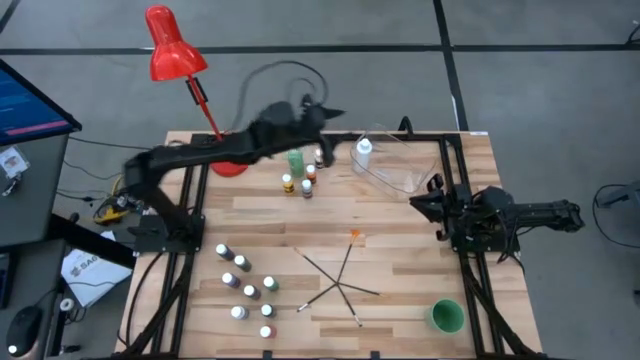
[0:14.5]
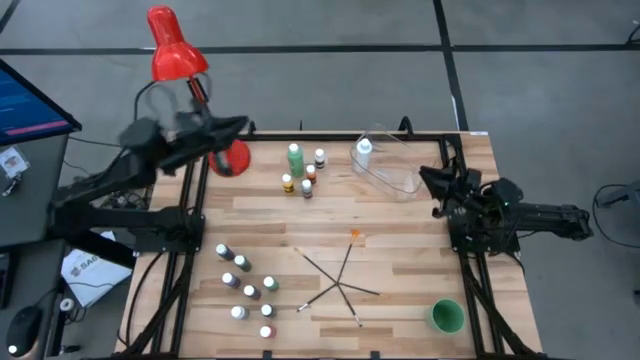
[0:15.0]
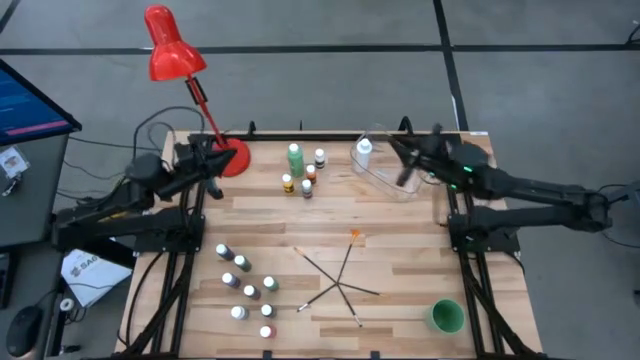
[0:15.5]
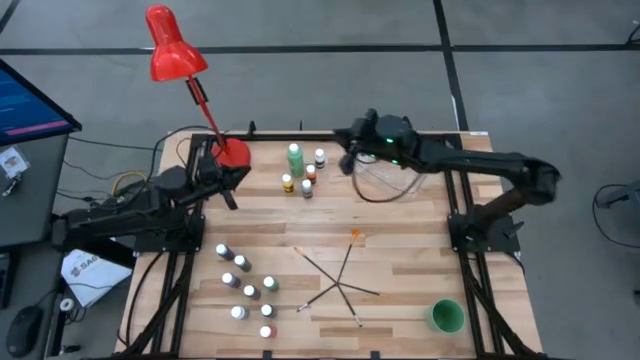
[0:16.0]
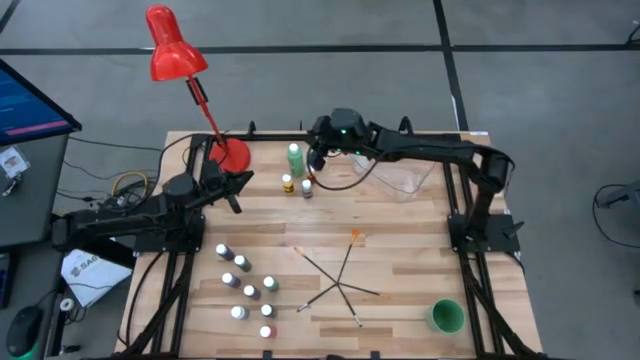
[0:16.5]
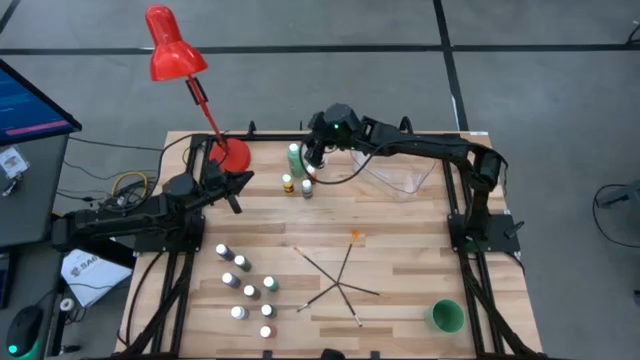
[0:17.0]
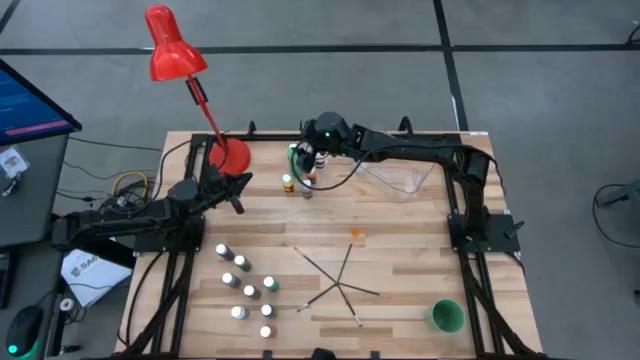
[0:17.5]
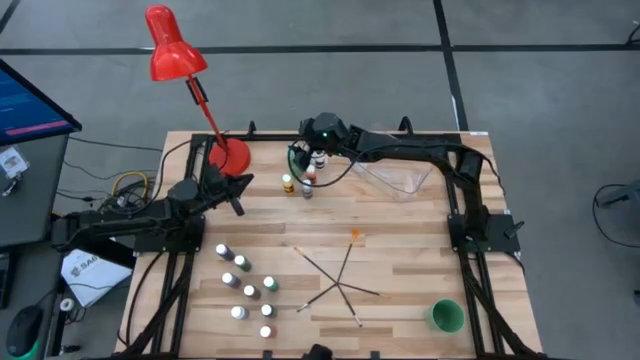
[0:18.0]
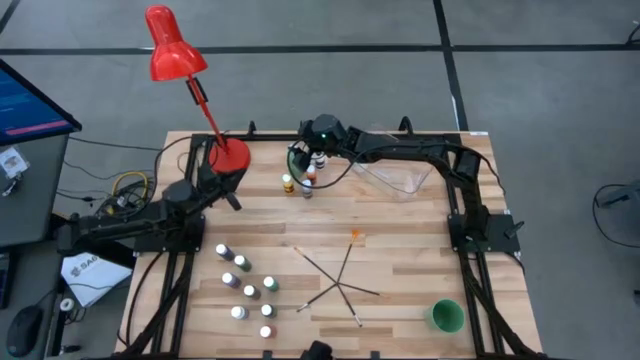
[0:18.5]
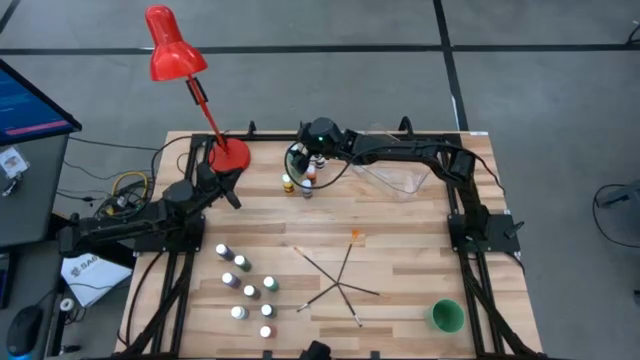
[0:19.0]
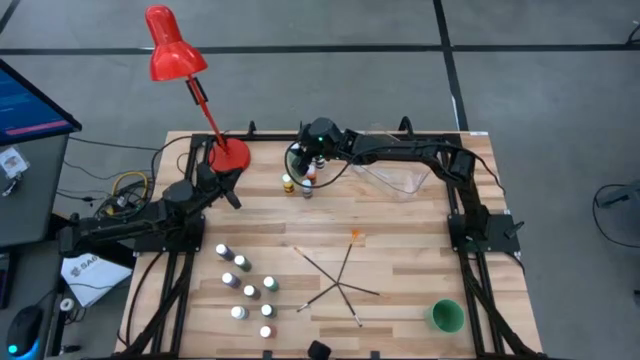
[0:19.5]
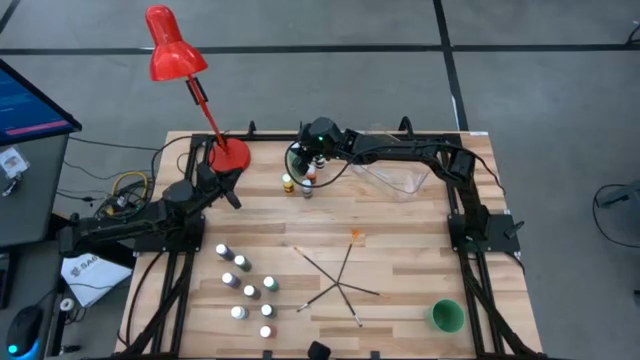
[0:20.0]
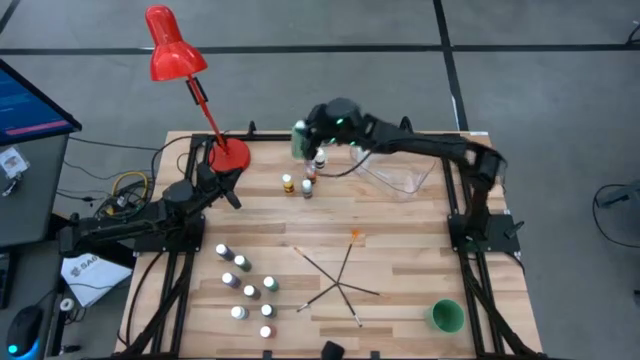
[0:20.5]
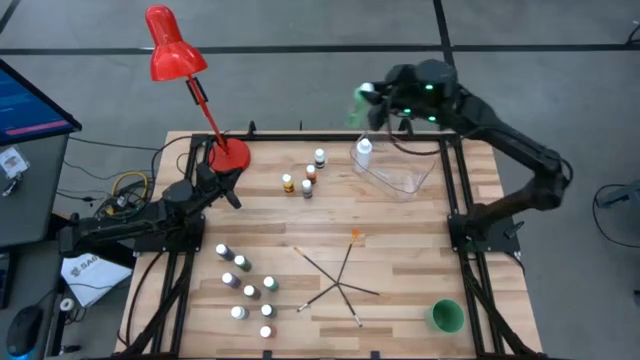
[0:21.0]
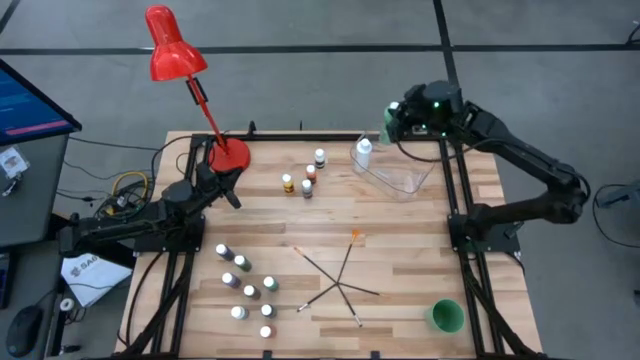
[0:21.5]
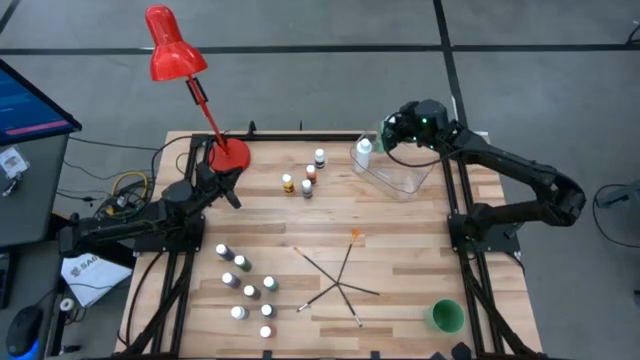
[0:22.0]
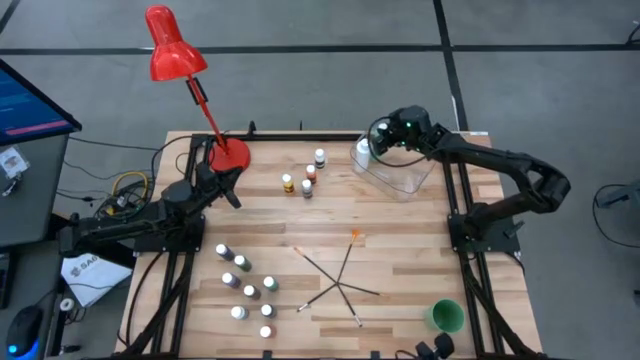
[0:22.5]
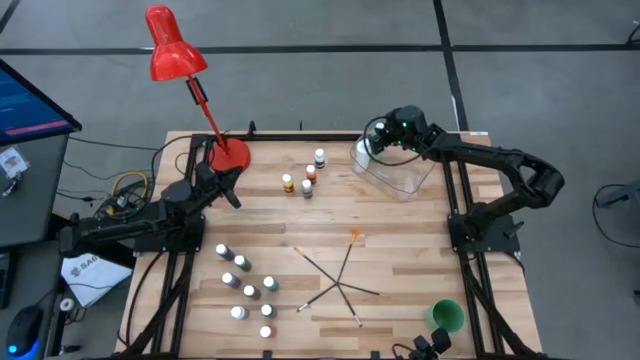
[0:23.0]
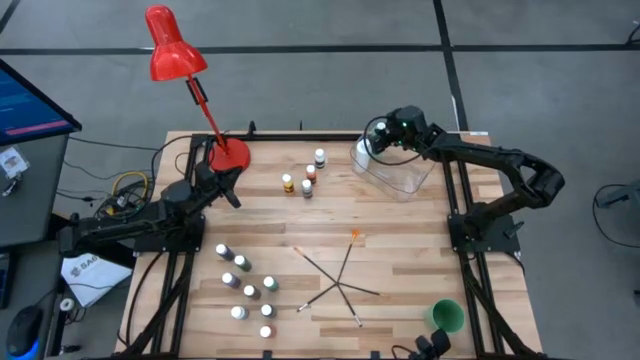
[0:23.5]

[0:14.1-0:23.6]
Task: Pick & Place Paint Supplies
Put the large green paint bottle into the transparent bin

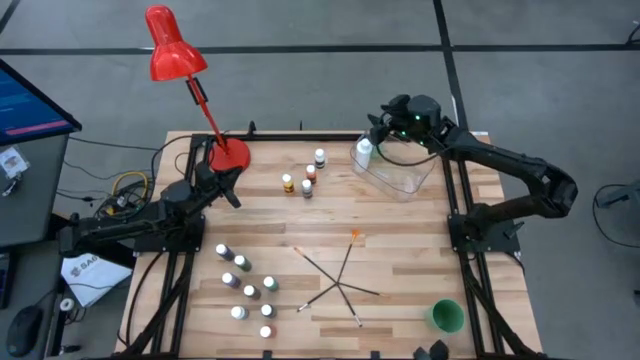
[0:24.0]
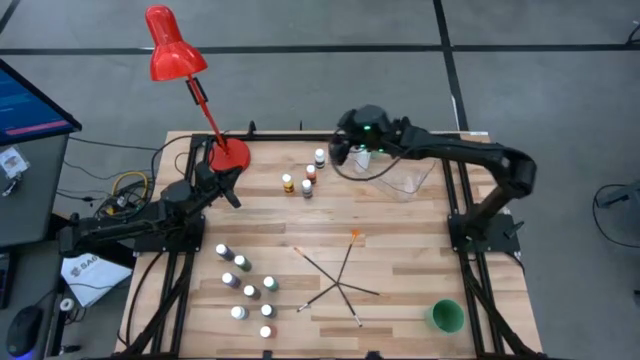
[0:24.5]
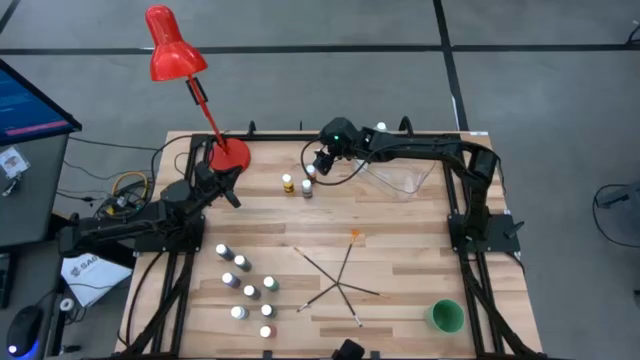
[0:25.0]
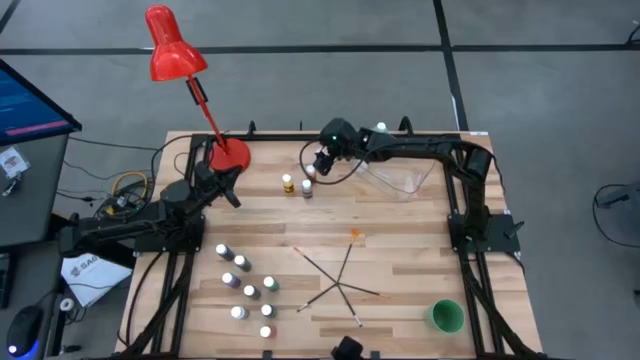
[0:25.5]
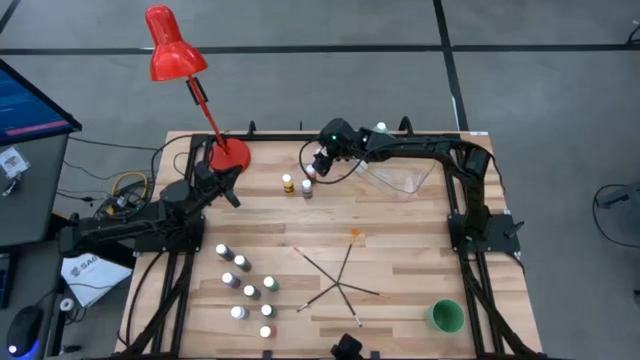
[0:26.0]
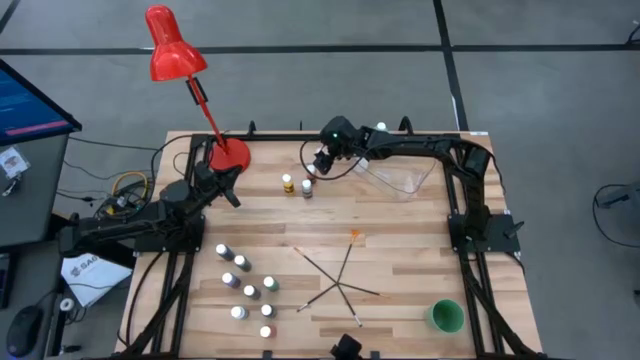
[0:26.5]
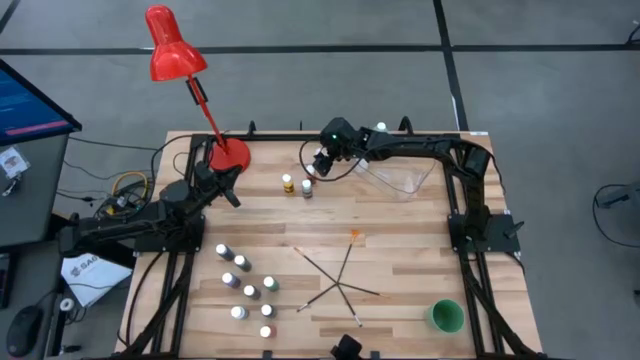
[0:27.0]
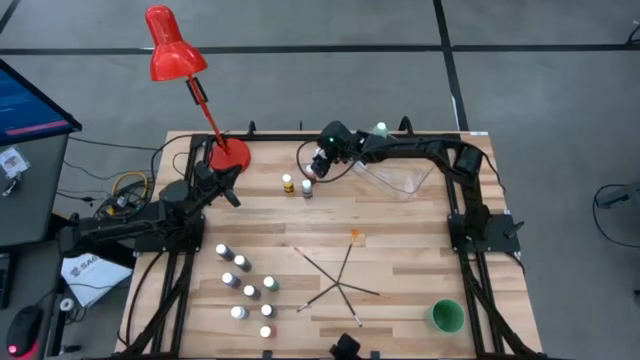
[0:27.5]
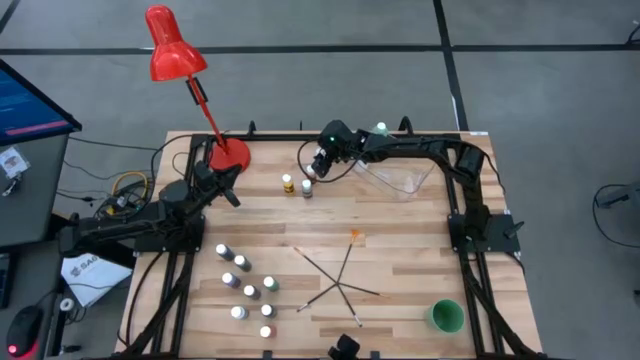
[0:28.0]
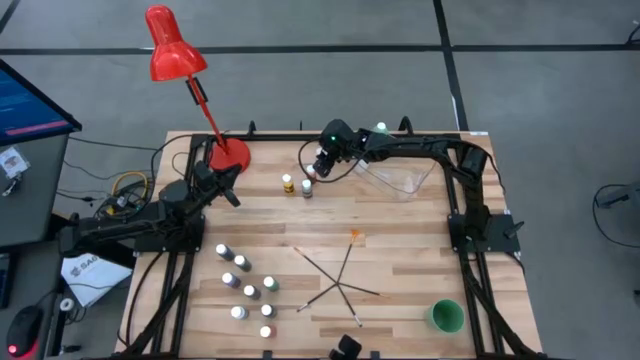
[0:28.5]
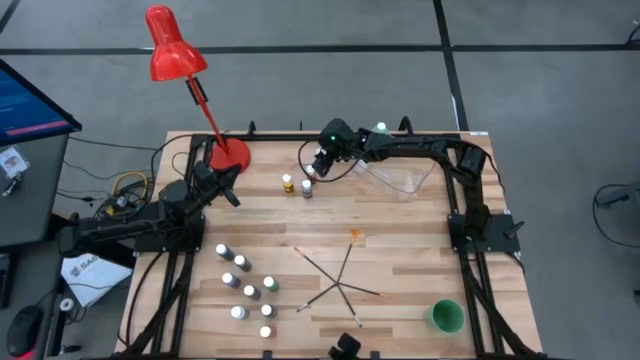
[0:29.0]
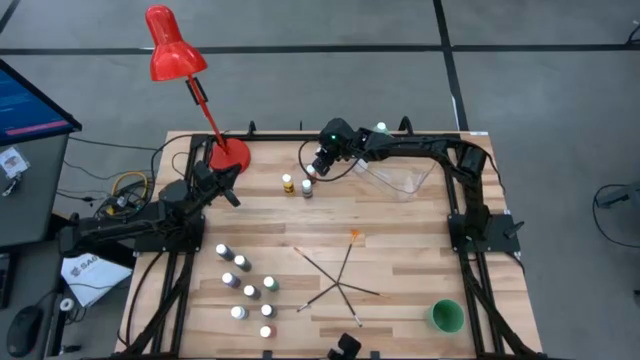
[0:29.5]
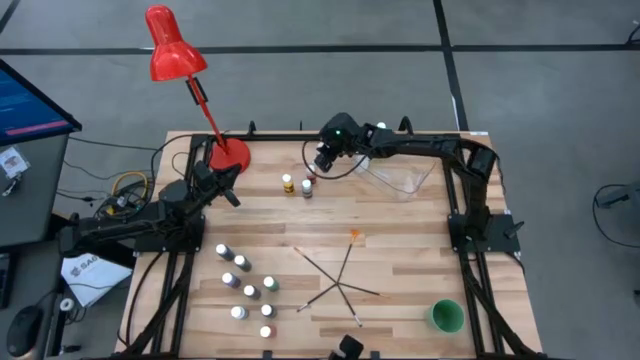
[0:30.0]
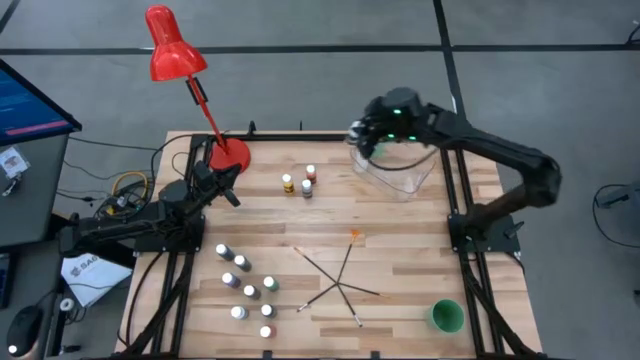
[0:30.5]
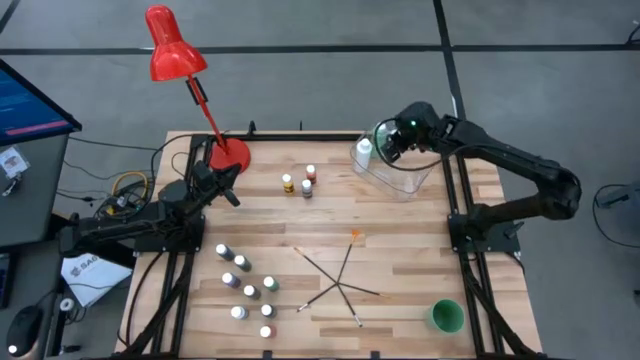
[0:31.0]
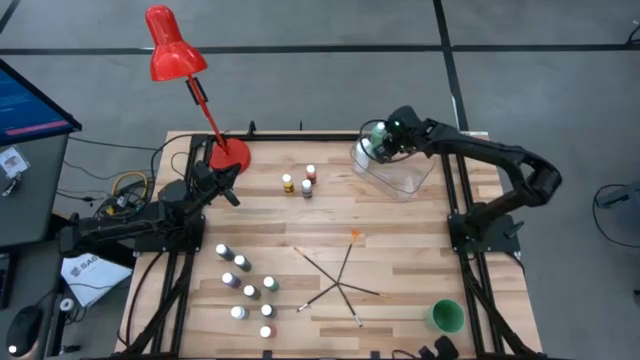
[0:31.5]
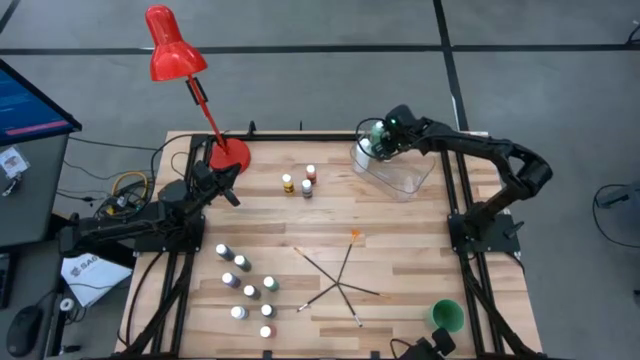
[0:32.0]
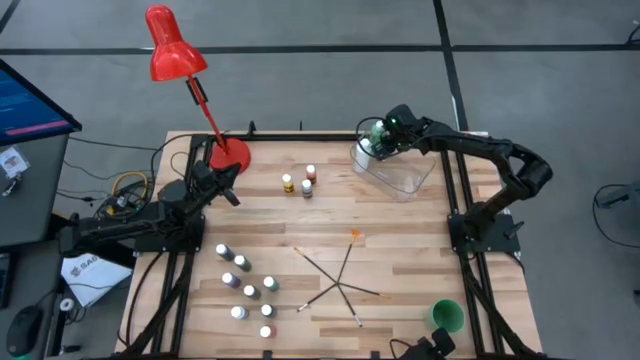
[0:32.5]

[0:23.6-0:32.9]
Put the small white paint bottle into the transparent bin

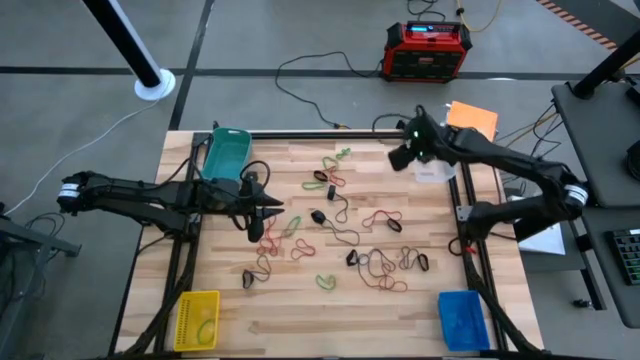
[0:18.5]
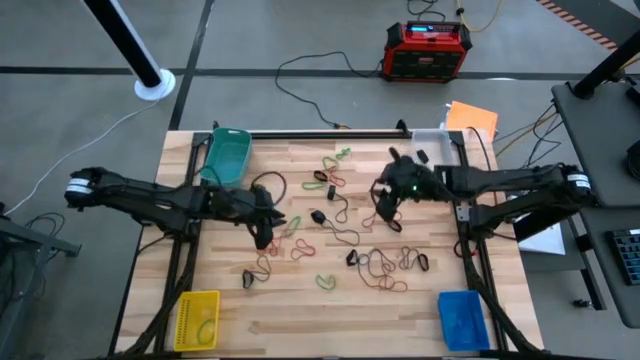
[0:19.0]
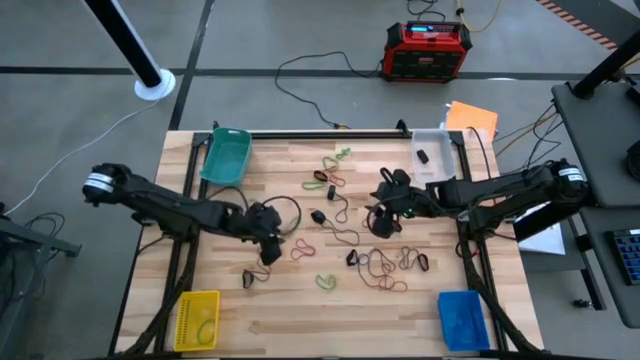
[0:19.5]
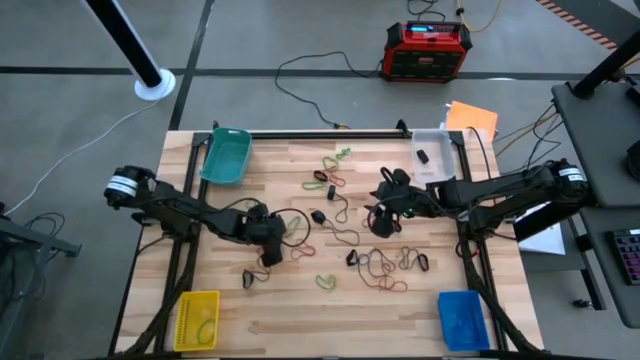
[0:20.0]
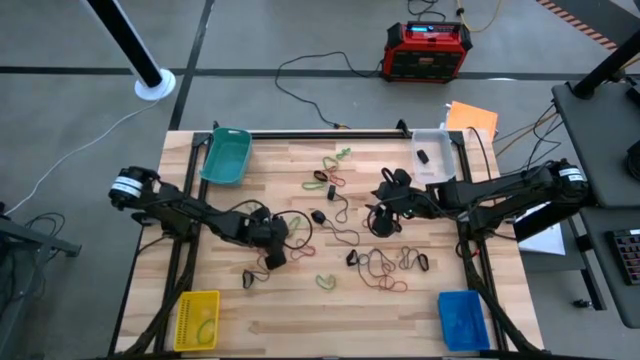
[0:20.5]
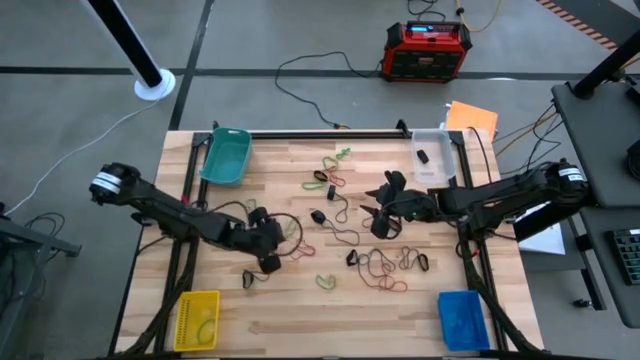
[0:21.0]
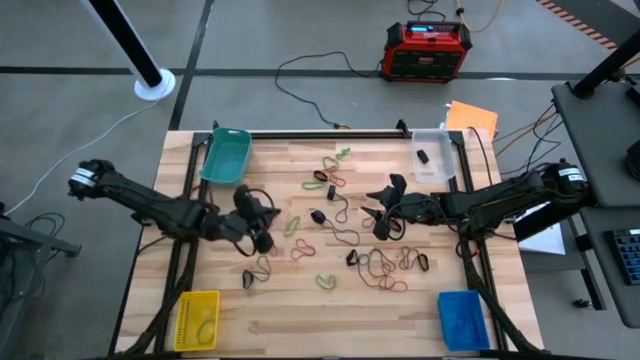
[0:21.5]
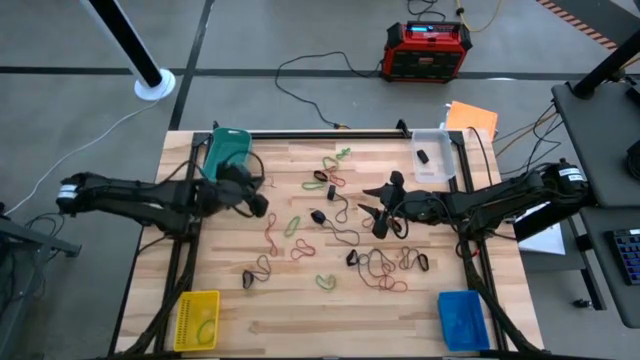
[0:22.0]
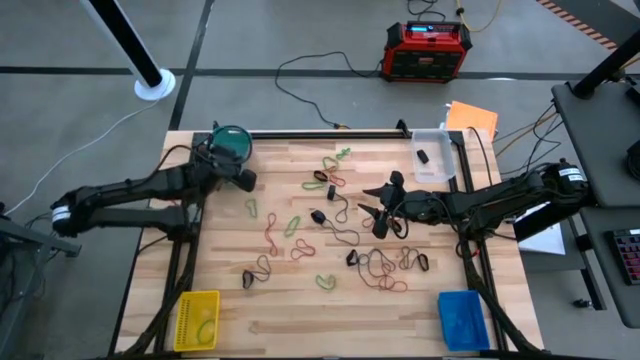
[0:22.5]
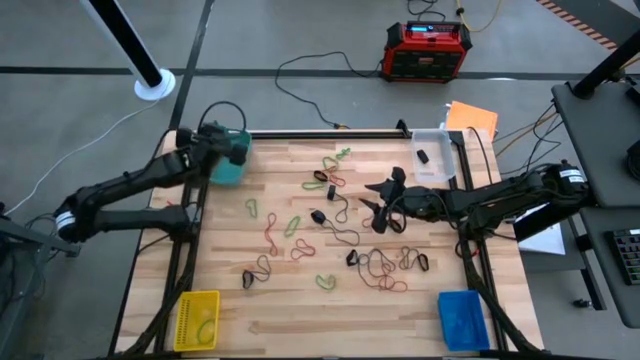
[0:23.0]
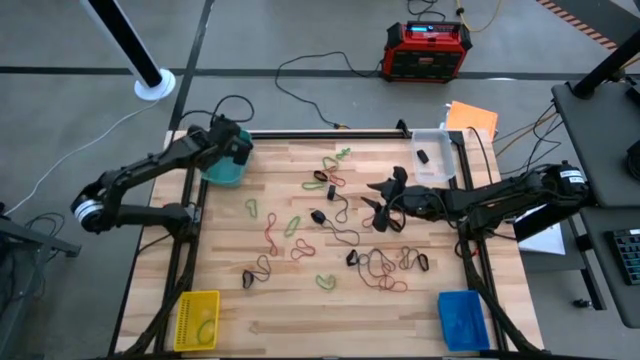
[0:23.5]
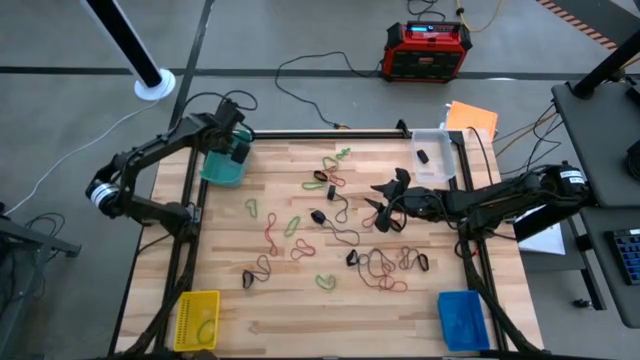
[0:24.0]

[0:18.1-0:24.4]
Task: Sort rubber bands into baskets
Put the red rubber band into the green bin
